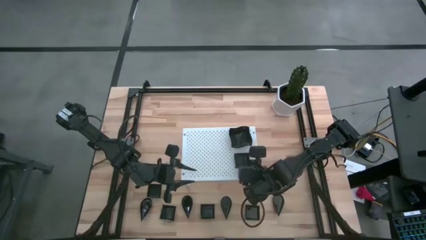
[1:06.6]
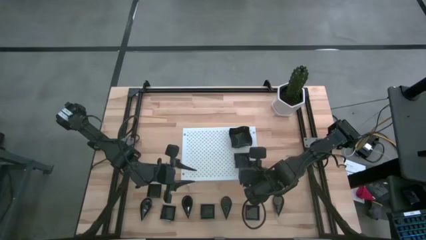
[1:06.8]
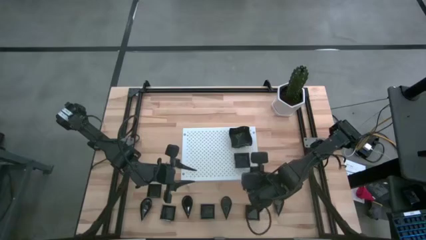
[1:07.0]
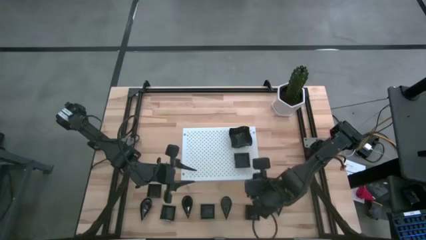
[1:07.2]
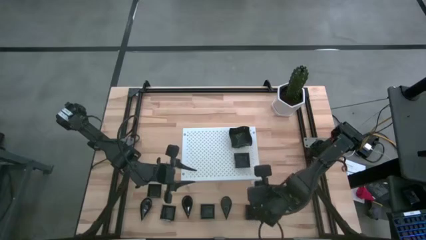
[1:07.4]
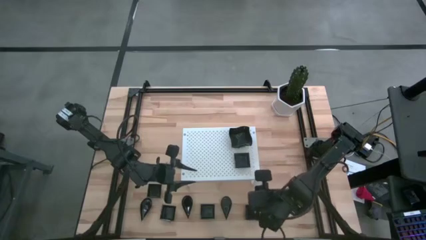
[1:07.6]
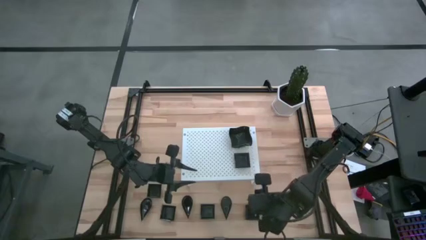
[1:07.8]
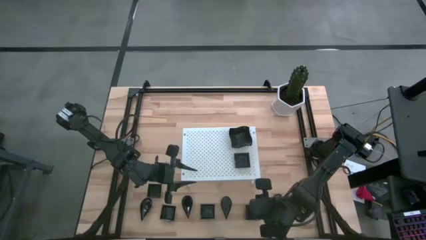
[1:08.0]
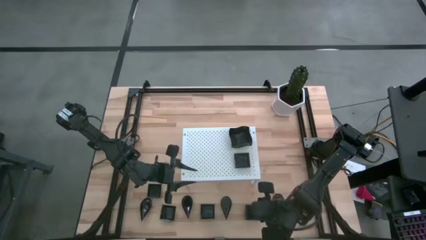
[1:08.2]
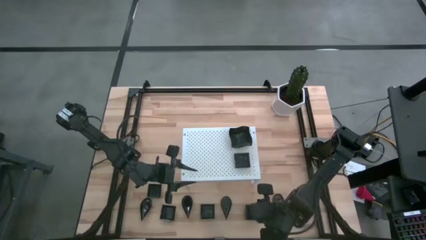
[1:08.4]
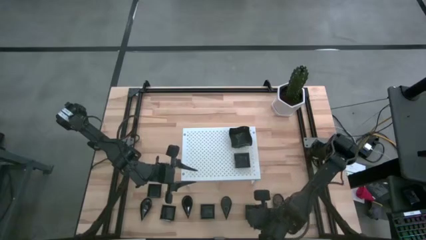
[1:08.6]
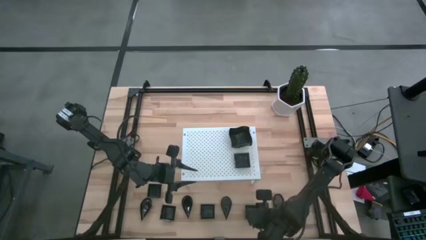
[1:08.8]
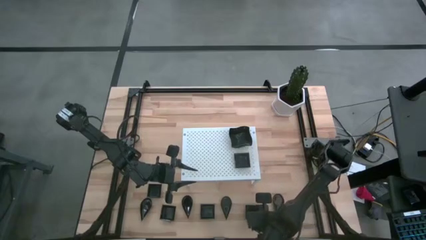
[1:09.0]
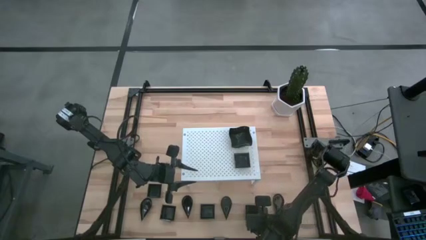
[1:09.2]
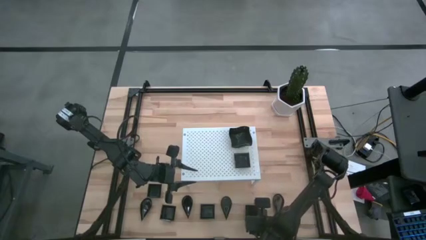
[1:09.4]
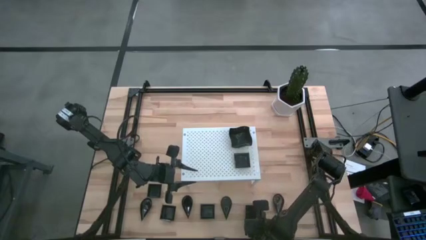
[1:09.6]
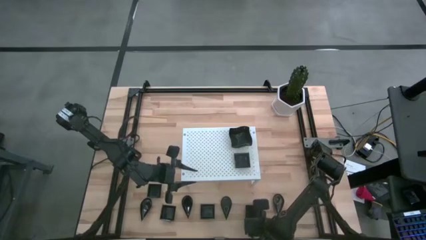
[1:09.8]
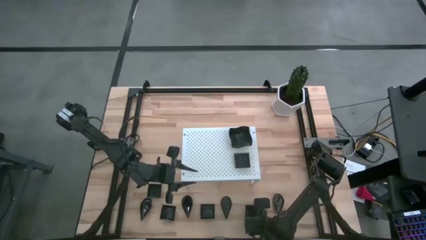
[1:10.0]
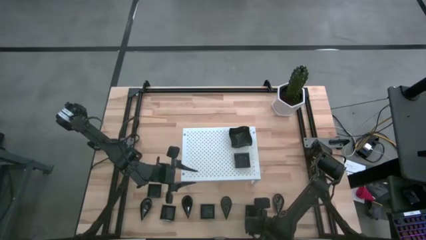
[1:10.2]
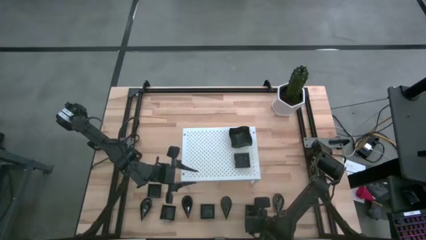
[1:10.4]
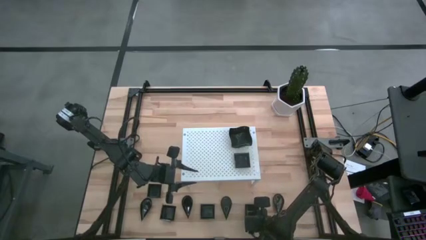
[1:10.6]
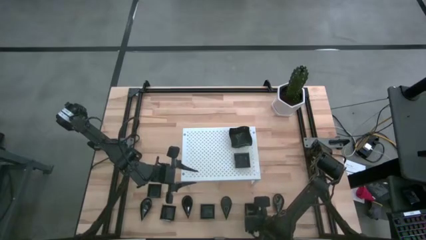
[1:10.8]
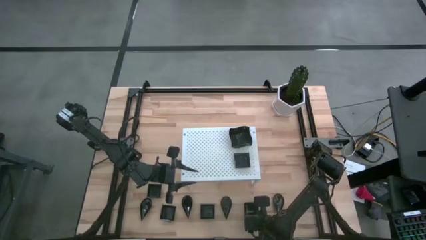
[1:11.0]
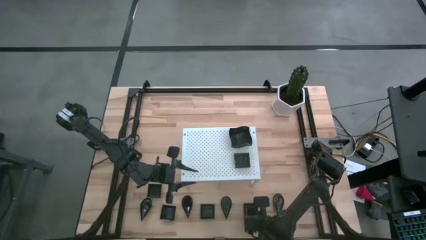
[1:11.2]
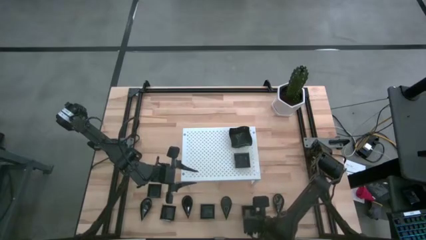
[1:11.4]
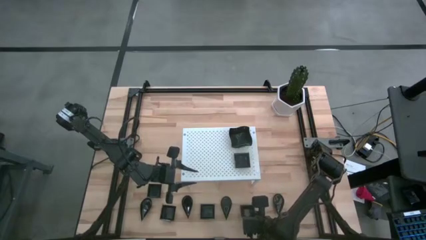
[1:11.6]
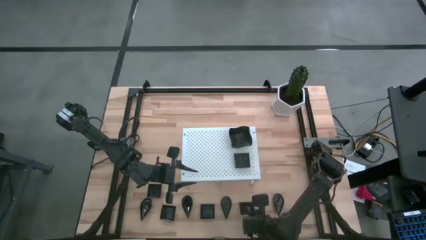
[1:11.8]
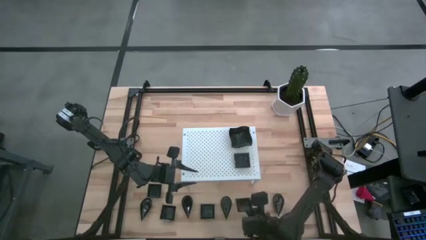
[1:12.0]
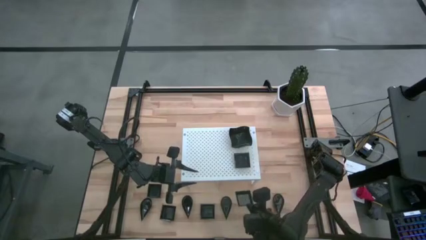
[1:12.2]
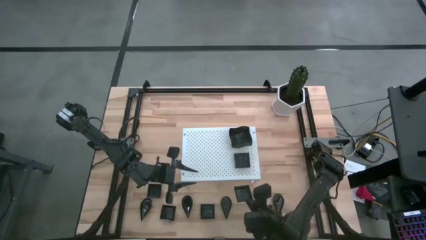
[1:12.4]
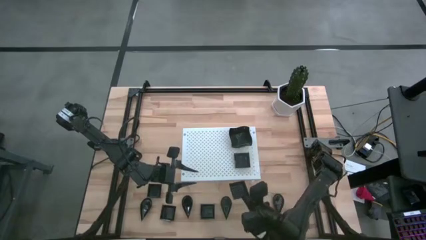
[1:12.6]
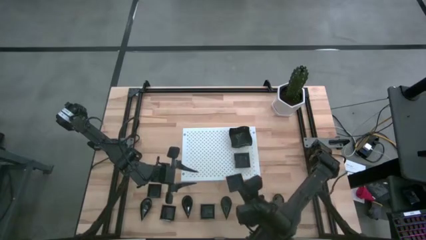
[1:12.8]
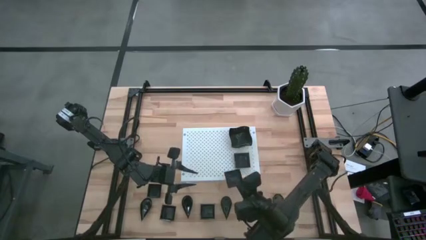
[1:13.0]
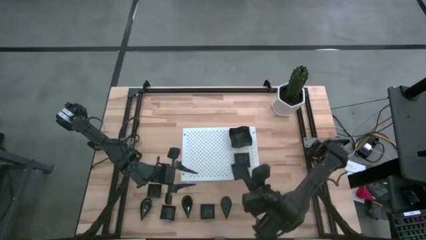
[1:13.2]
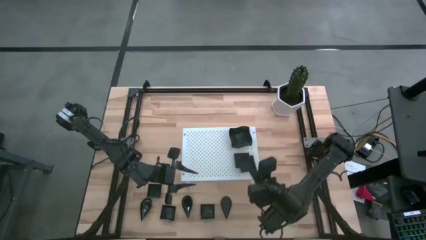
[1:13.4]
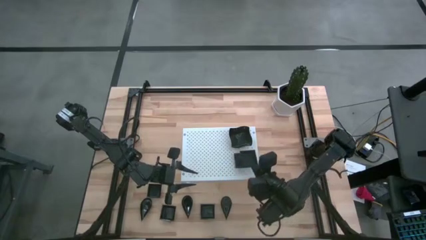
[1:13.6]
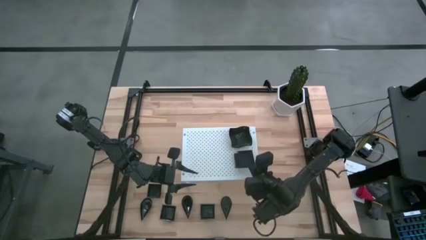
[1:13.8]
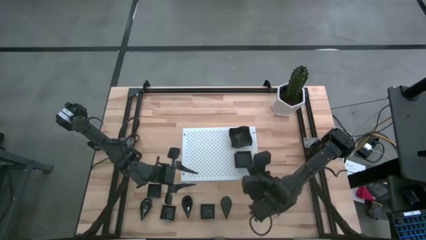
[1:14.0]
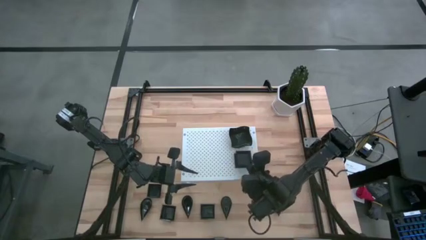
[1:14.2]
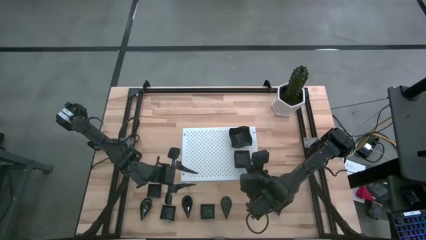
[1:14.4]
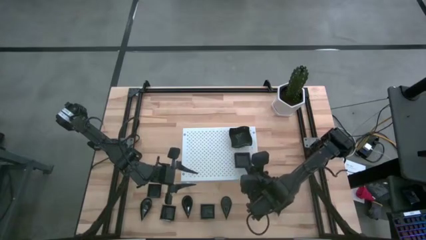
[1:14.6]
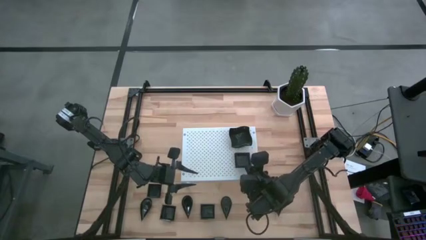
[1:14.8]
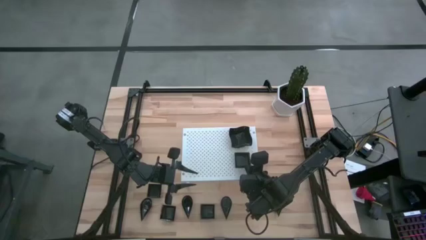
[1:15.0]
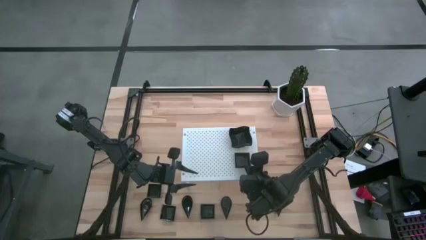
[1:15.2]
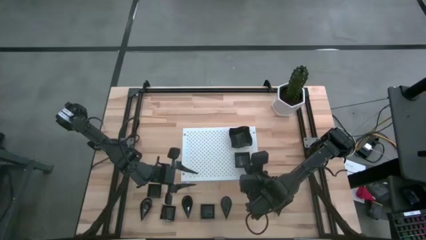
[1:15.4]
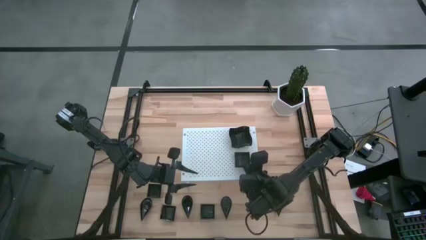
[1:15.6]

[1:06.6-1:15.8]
Task: Pick & Place Mini shaped plates
Stack the square plate on top of the other square plate on the shelf

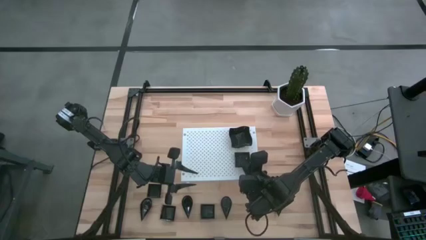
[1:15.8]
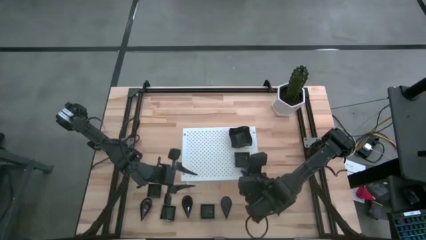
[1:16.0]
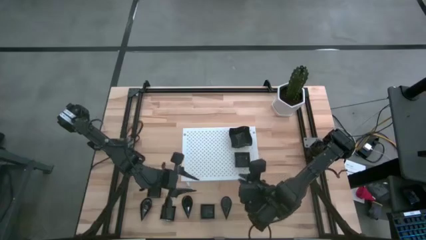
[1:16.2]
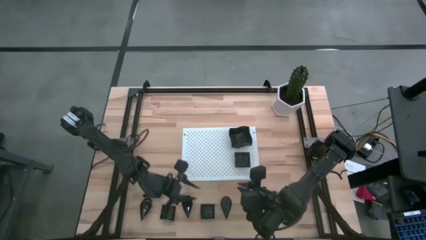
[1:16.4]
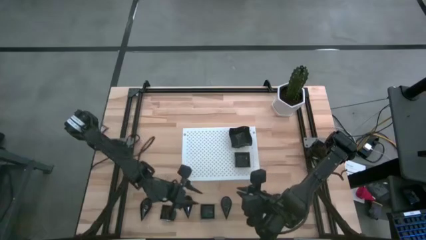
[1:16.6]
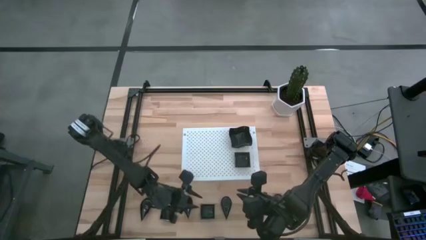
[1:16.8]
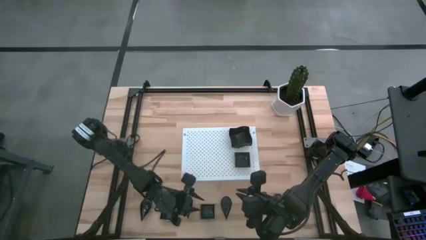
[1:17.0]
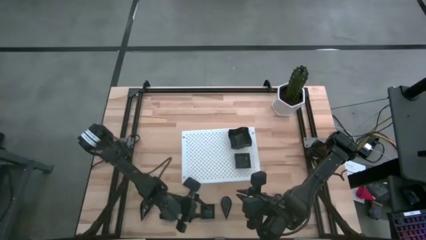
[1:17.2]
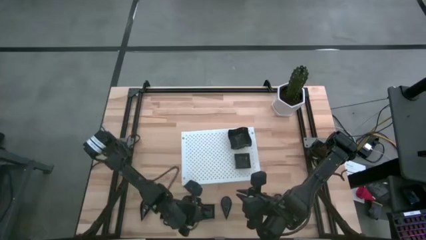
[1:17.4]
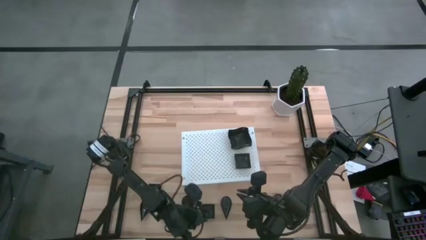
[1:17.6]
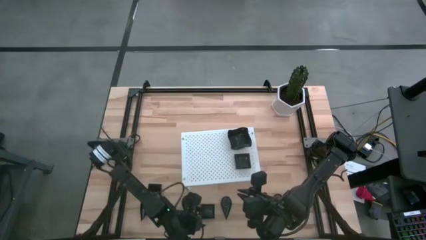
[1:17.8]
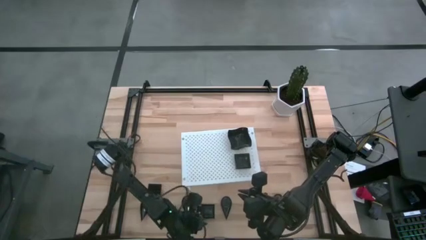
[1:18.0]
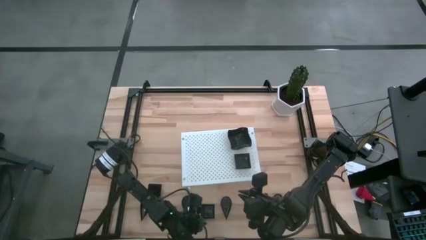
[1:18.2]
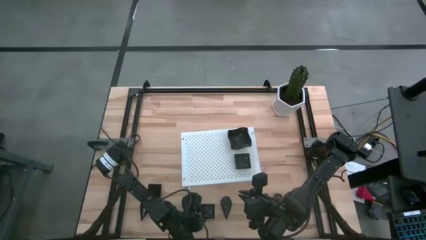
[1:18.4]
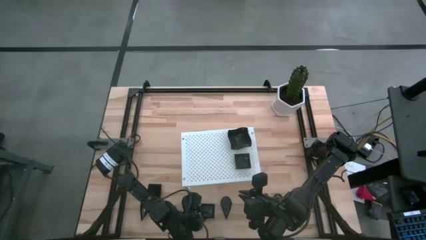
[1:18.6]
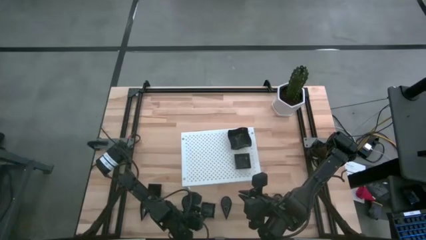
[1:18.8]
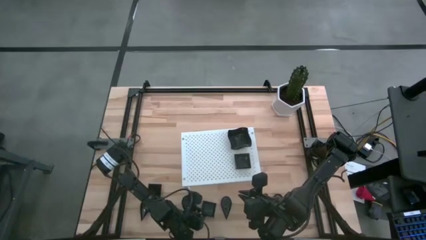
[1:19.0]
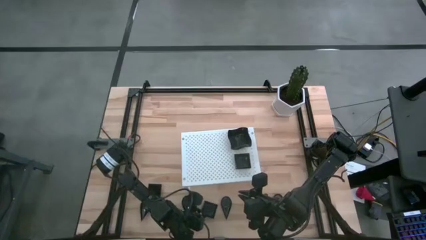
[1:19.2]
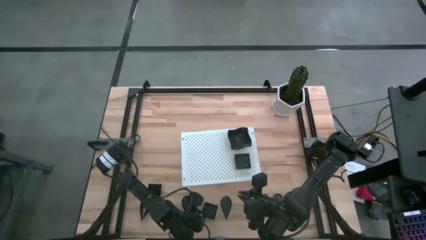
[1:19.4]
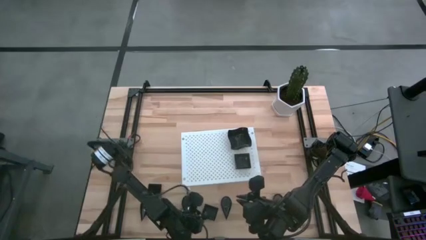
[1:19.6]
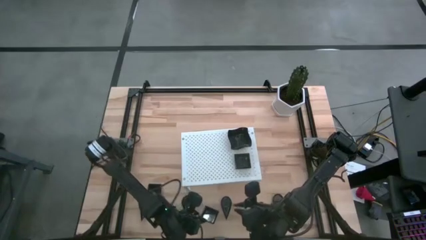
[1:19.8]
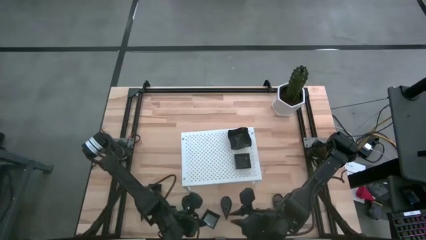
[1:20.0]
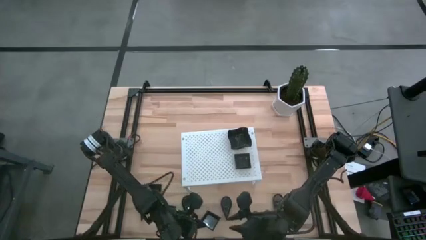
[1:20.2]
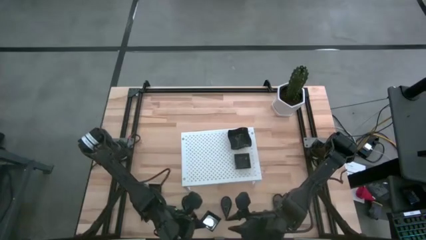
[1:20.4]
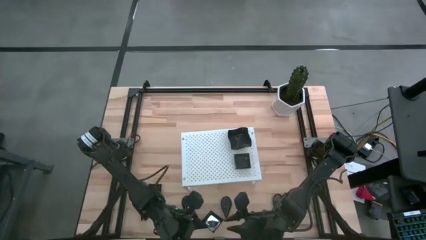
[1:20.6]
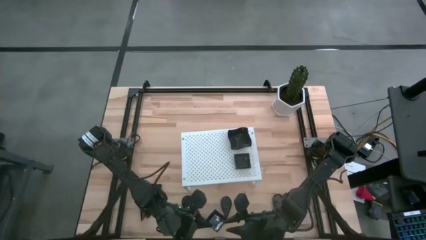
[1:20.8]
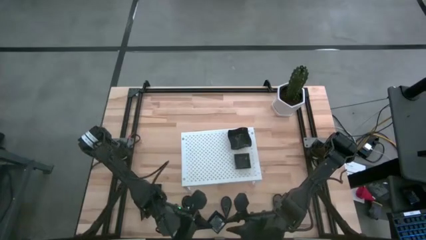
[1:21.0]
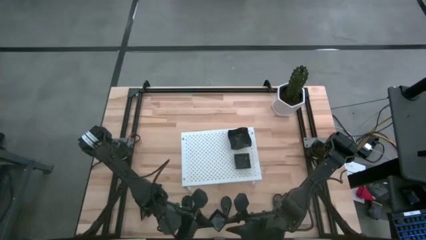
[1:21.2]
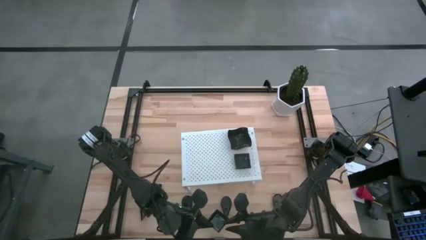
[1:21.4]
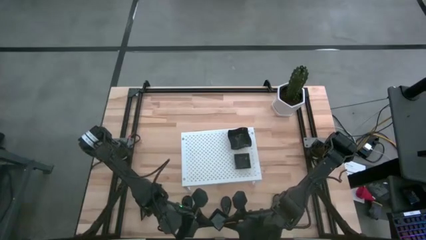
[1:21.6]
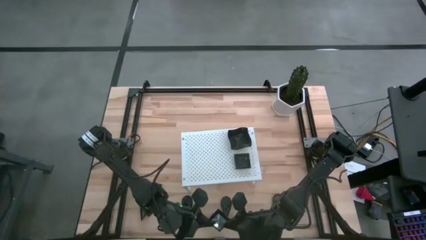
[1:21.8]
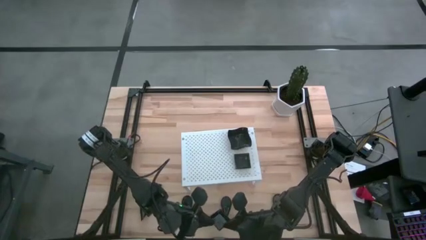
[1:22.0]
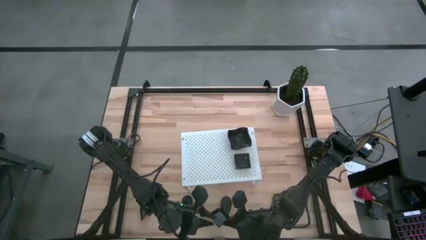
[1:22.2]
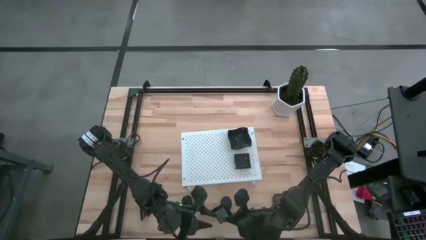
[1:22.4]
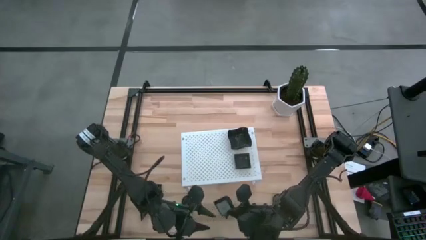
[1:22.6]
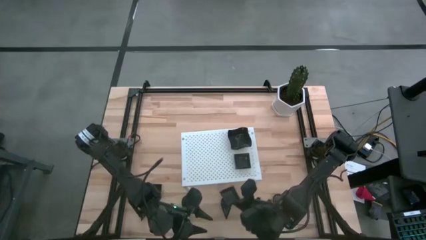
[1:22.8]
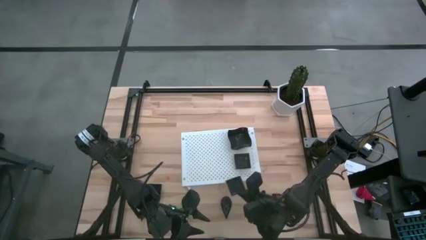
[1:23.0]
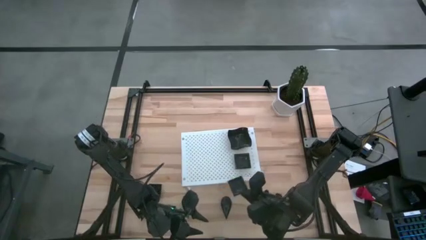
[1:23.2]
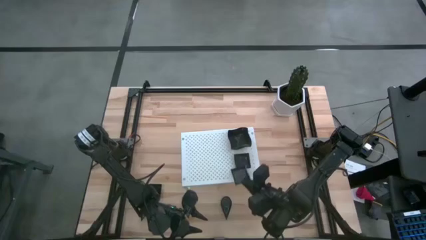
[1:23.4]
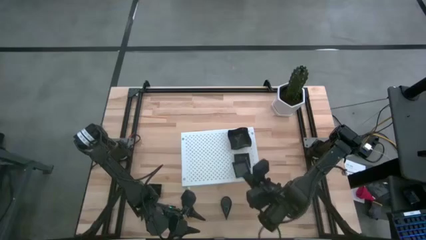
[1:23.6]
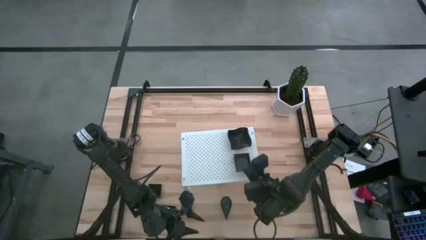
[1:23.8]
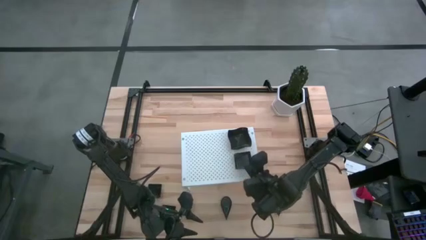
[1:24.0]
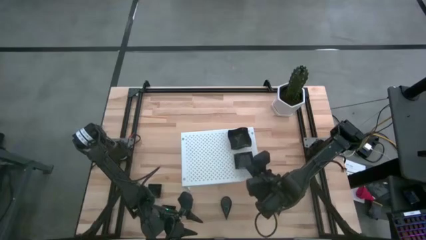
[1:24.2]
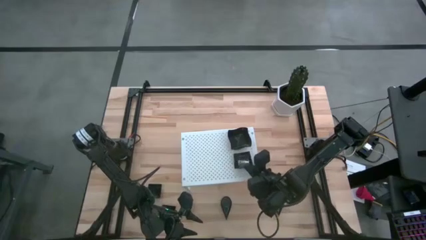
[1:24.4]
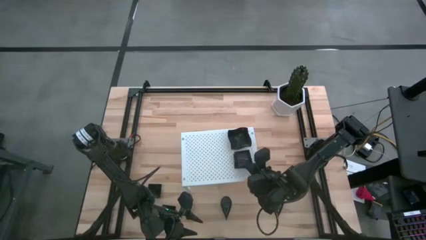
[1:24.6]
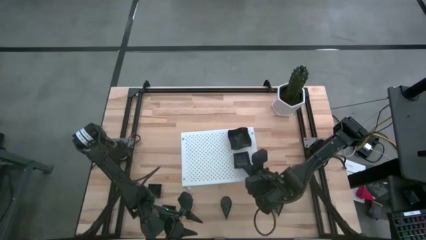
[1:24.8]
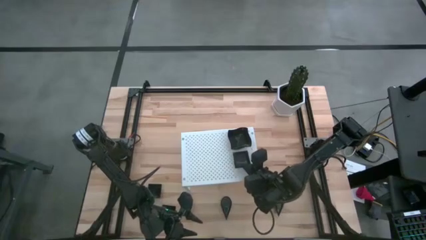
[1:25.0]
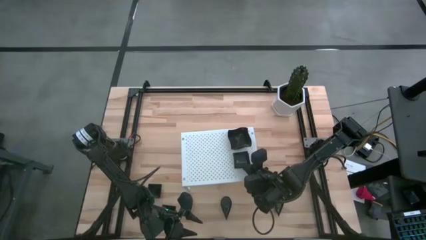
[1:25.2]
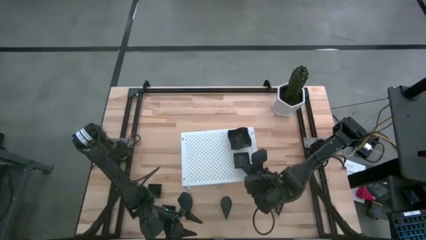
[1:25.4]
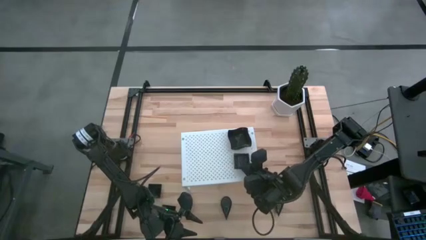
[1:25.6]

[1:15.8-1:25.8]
Stack the square plate on top of the other square plate on the shelf
